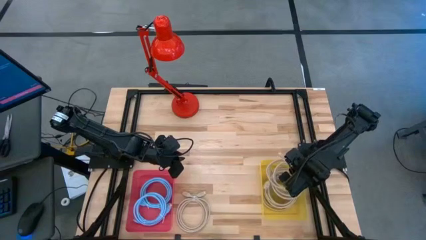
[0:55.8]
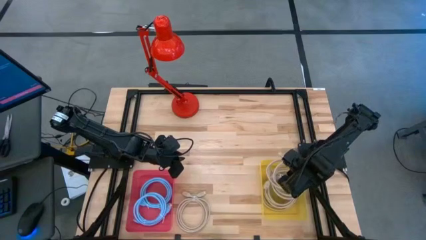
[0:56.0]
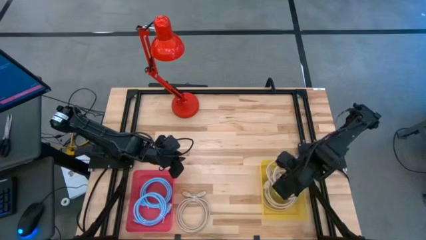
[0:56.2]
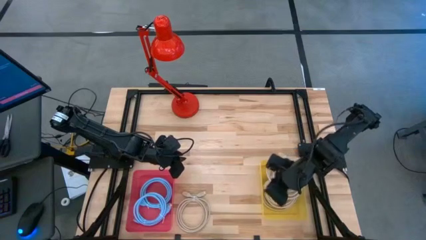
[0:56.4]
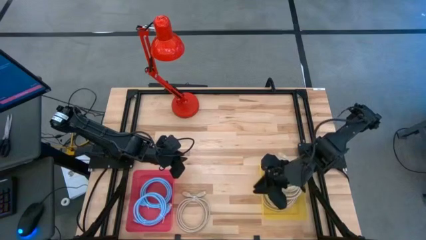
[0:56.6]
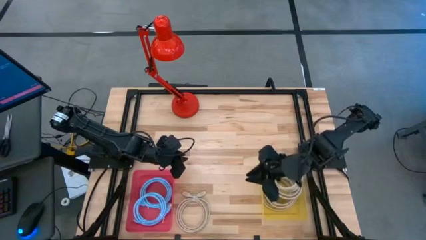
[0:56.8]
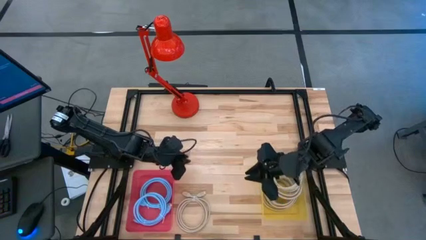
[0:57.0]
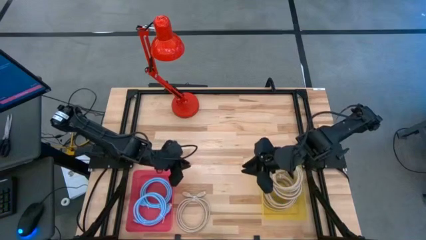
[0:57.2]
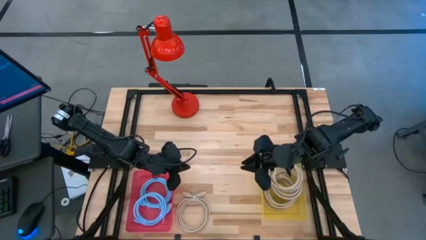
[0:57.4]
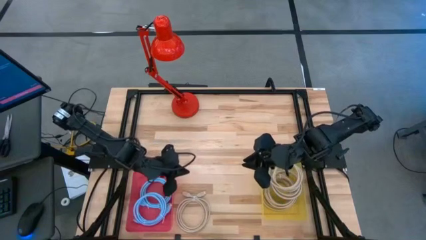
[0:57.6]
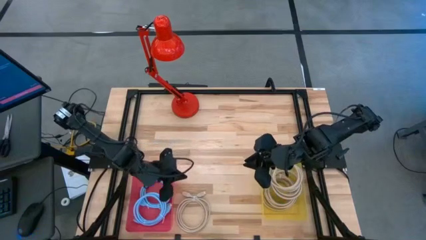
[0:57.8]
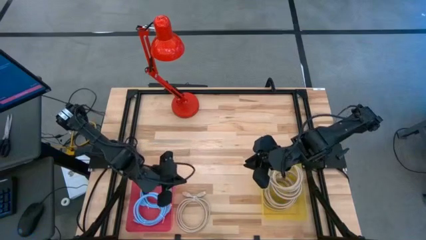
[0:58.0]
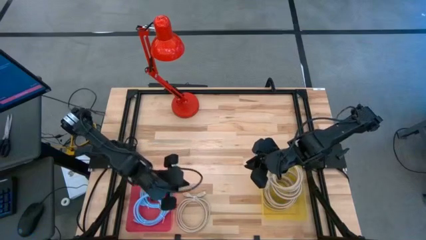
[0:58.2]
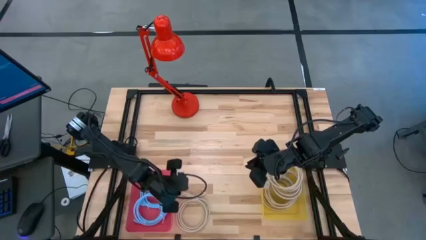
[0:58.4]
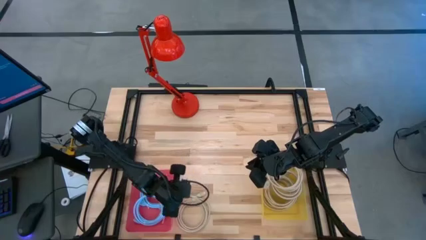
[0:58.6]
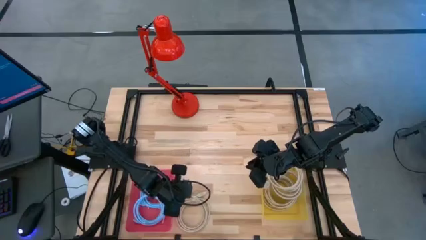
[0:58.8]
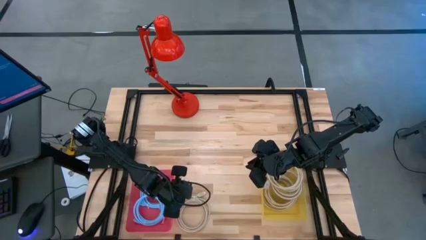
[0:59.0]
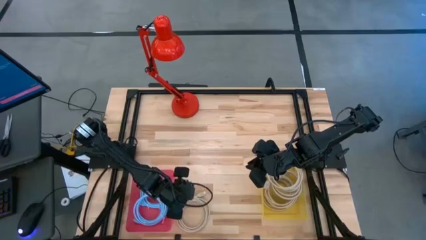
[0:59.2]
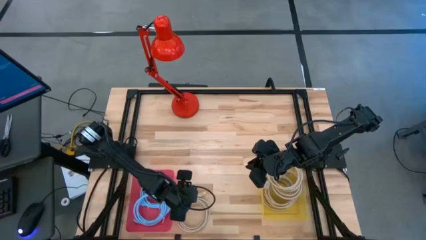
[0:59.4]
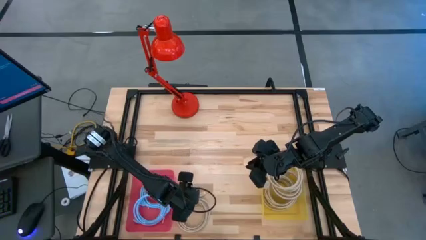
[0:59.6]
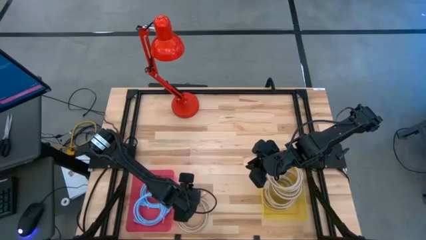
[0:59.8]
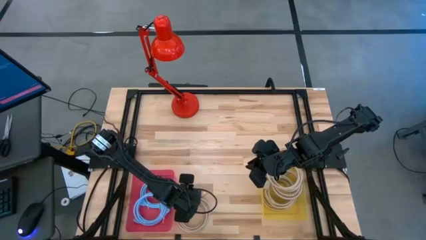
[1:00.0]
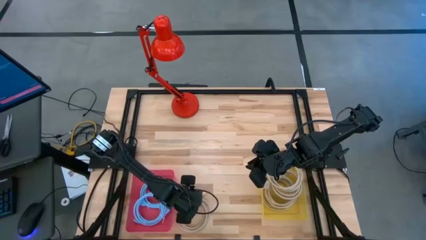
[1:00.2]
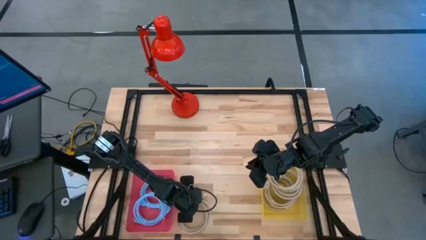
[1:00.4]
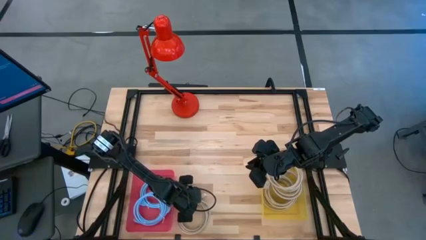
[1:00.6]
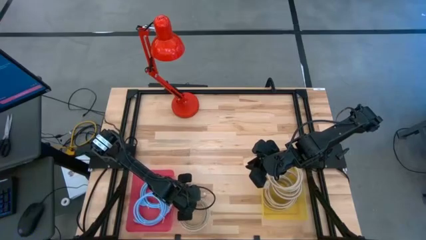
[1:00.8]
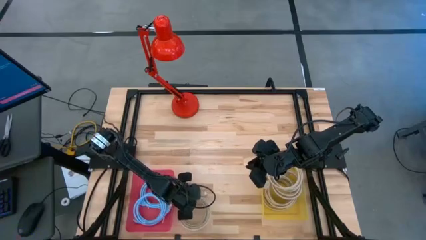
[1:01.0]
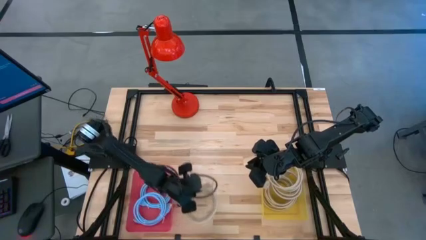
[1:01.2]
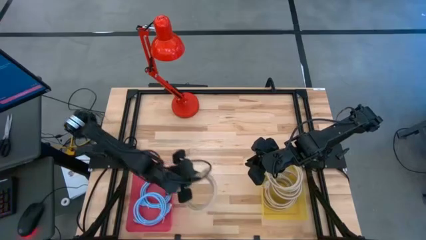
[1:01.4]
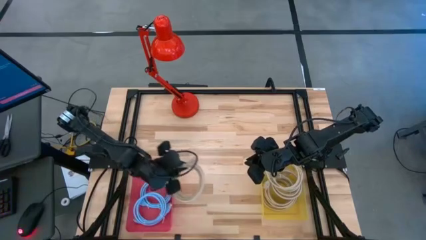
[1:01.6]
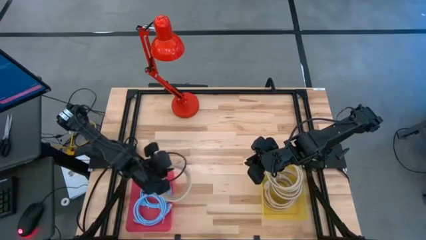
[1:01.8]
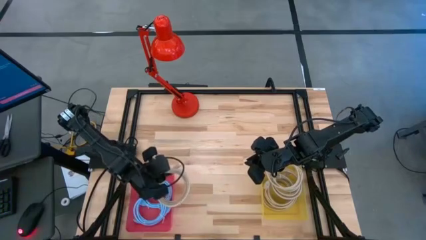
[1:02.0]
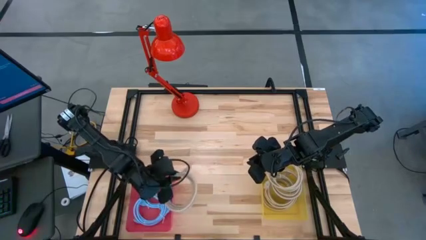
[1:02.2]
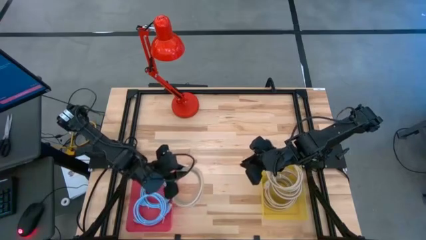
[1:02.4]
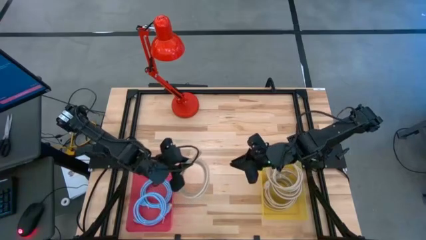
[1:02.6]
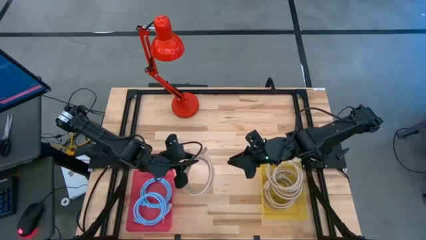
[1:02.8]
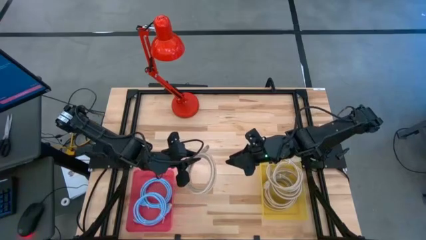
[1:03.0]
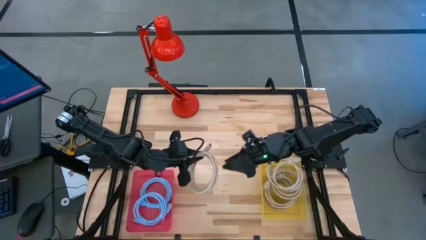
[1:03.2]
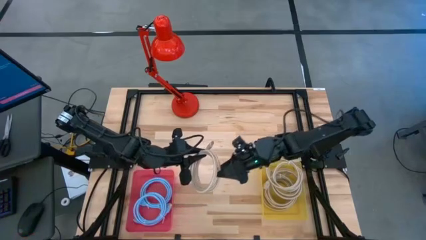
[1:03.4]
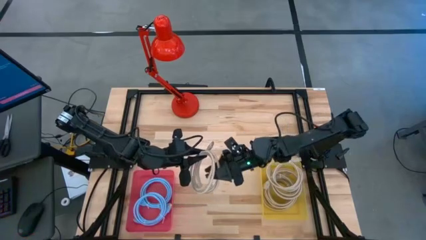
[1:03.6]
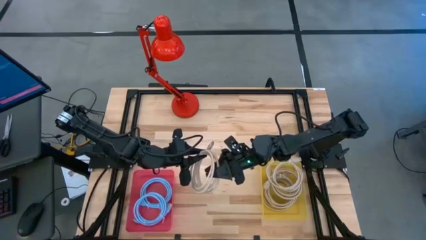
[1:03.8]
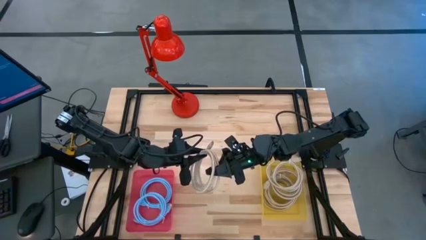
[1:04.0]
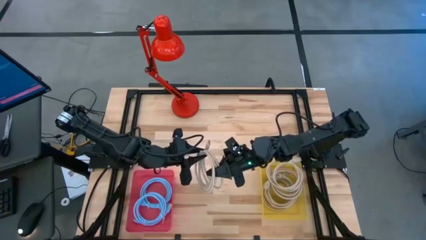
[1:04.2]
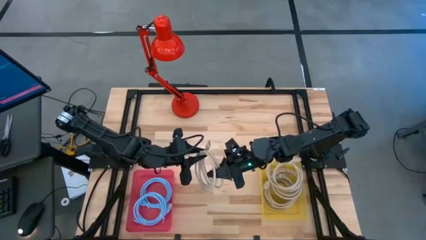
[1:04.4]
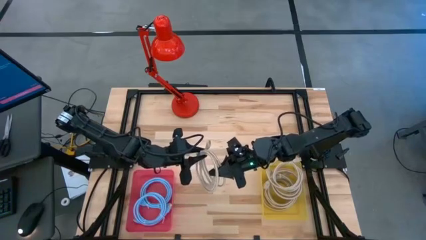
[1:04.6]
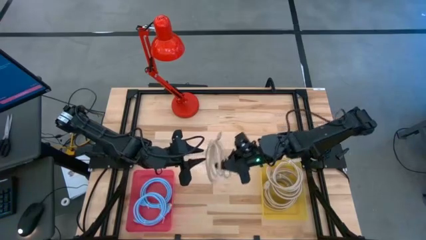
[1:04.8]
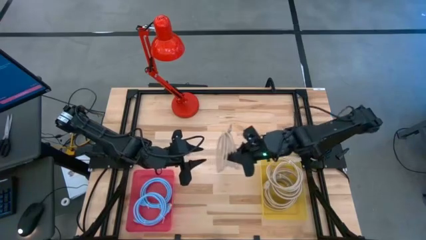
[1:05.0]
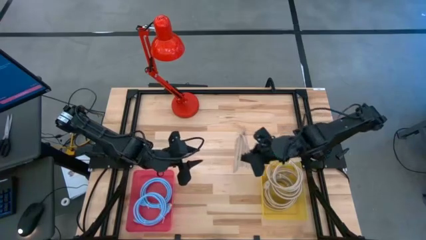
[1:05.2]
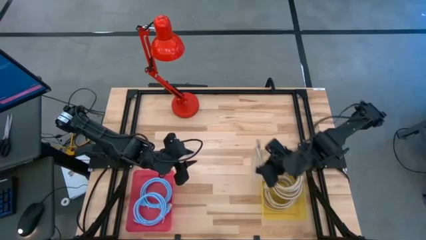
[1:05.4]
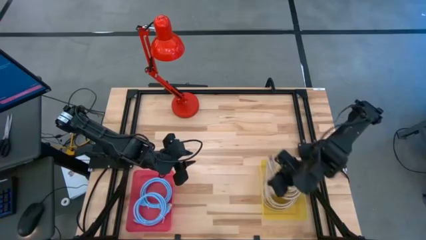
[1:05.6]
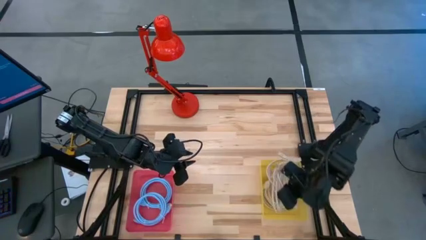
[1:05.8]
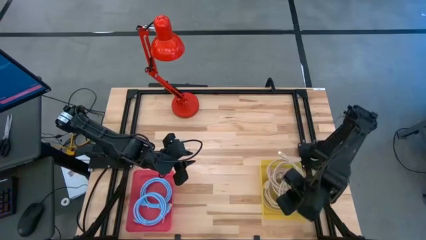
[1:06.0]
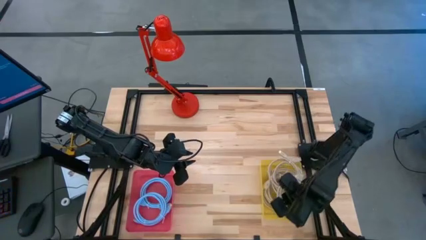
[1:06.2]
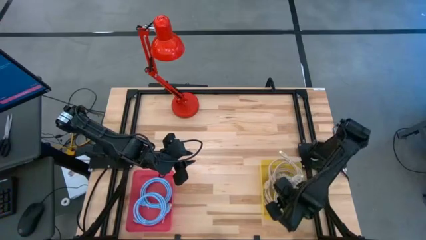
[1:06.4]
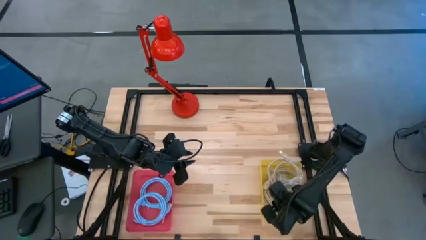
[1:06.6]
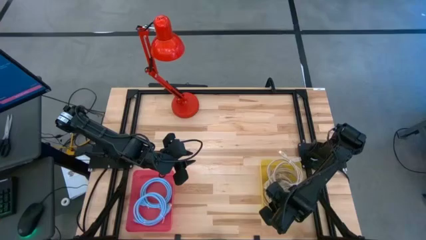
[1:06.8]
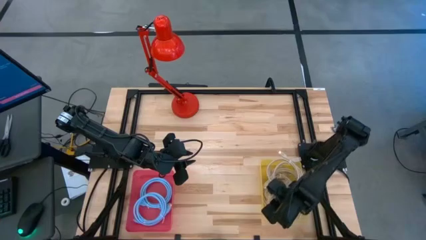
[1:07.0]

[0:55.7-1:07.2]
Task: Pick & Place USB Port
Put the light yellow charger cable into the yellow bin
